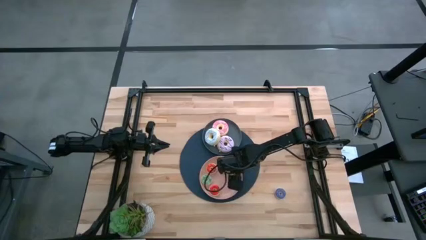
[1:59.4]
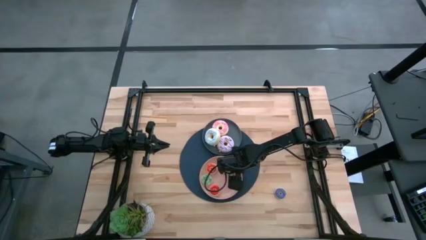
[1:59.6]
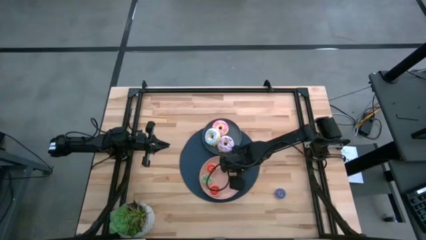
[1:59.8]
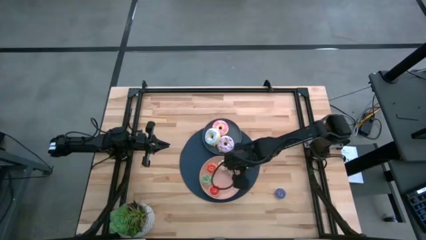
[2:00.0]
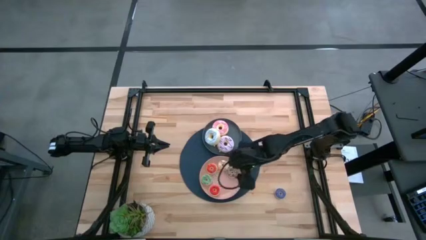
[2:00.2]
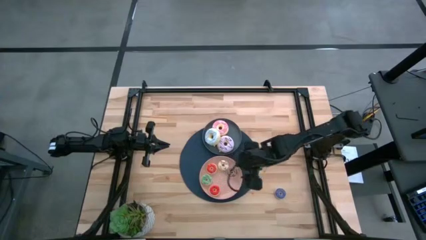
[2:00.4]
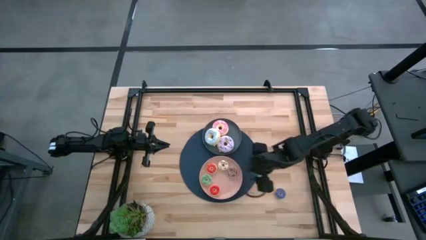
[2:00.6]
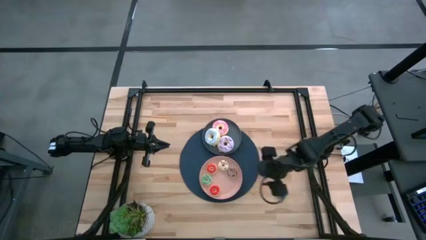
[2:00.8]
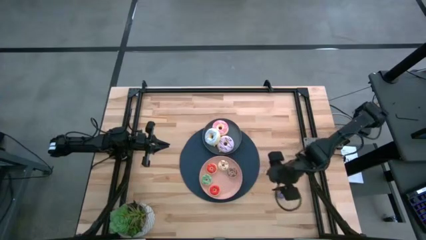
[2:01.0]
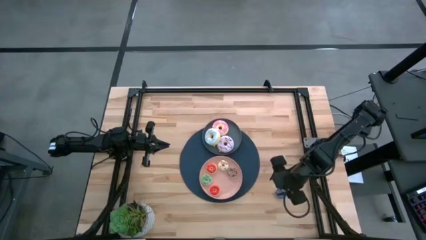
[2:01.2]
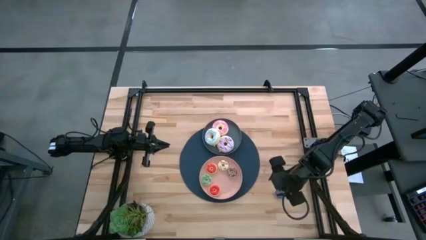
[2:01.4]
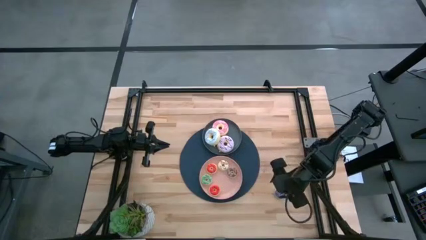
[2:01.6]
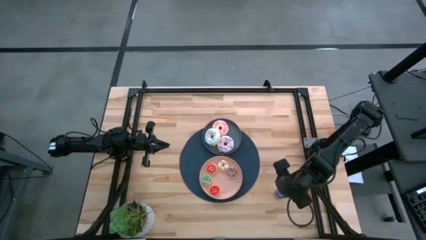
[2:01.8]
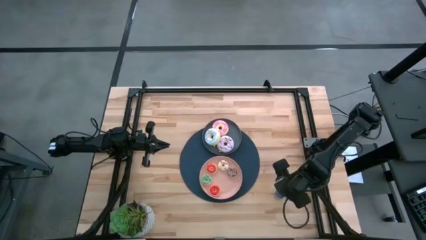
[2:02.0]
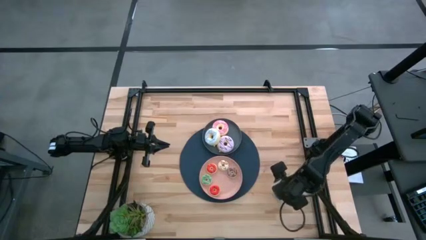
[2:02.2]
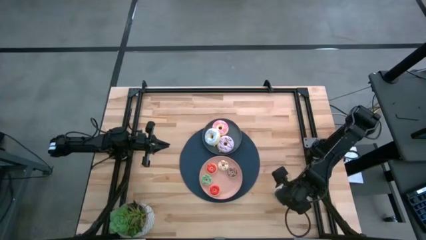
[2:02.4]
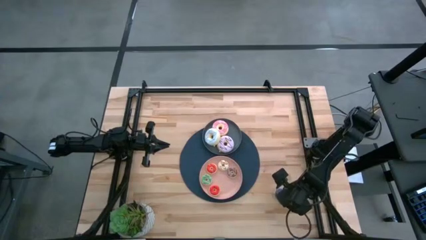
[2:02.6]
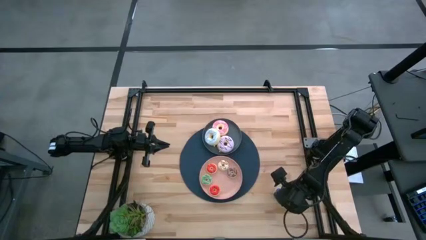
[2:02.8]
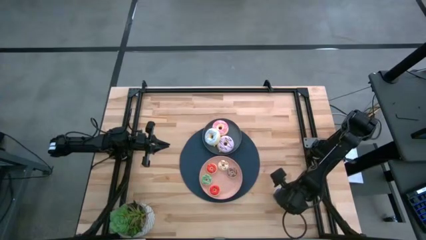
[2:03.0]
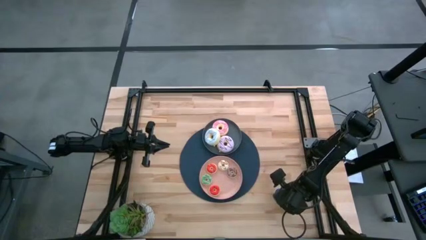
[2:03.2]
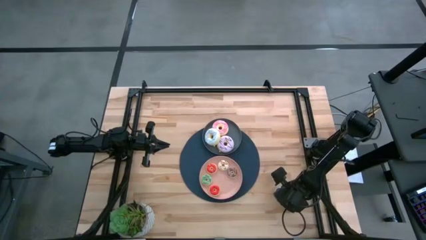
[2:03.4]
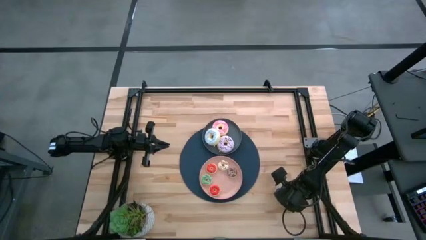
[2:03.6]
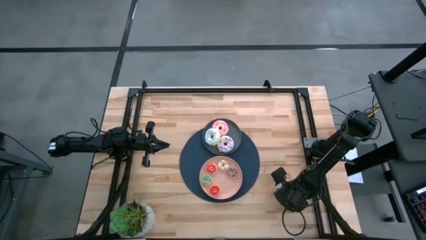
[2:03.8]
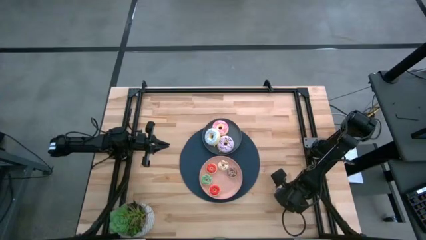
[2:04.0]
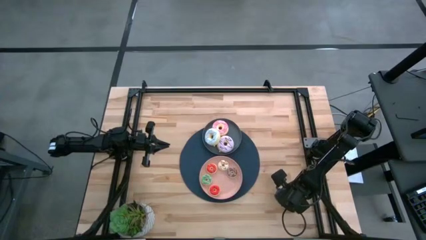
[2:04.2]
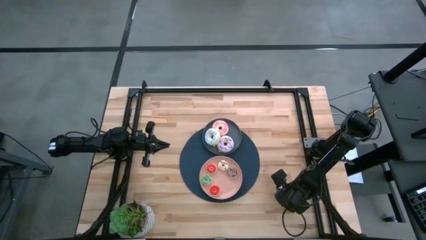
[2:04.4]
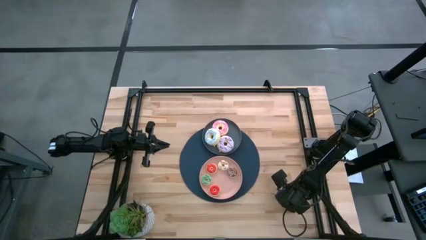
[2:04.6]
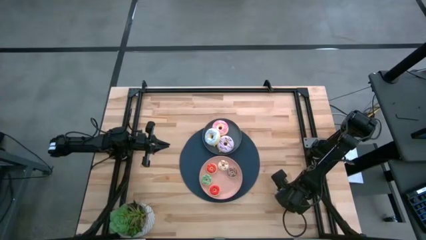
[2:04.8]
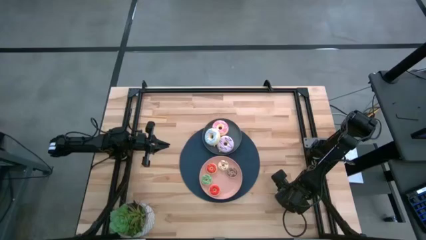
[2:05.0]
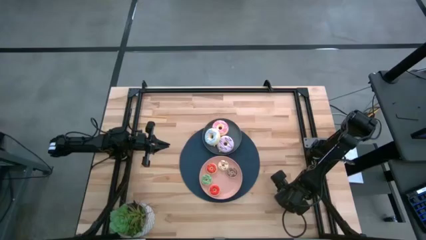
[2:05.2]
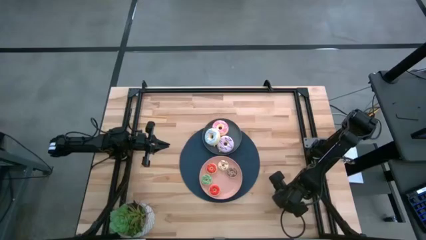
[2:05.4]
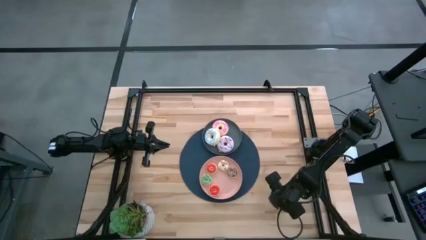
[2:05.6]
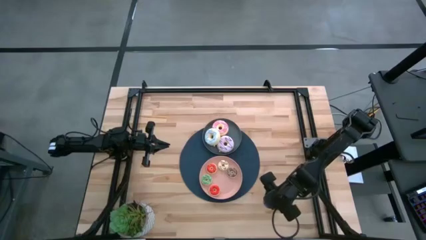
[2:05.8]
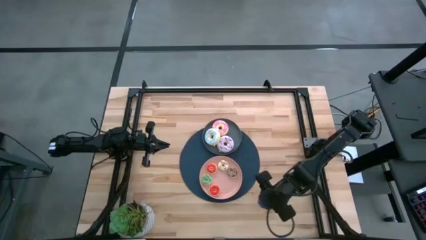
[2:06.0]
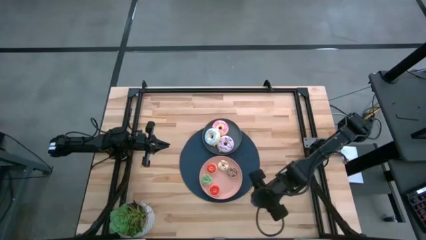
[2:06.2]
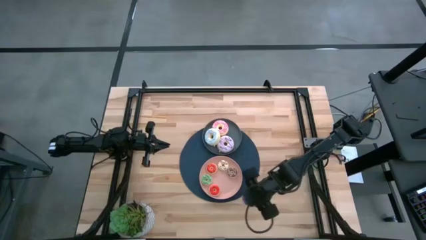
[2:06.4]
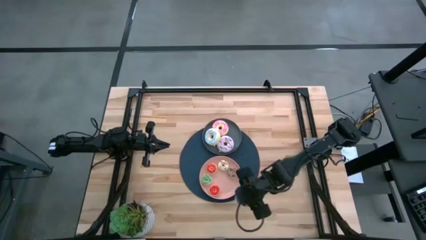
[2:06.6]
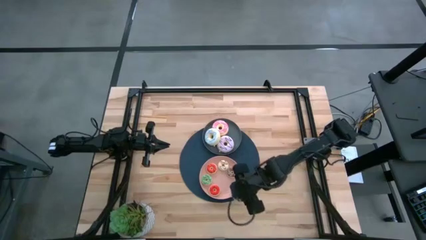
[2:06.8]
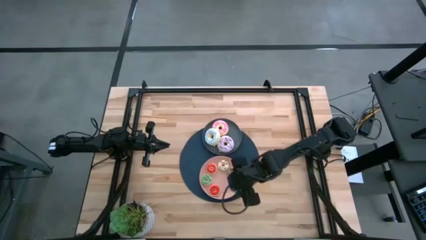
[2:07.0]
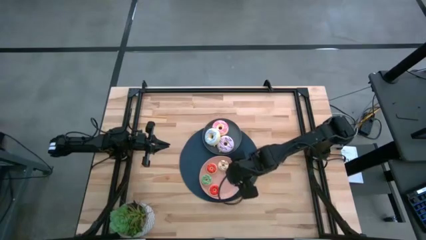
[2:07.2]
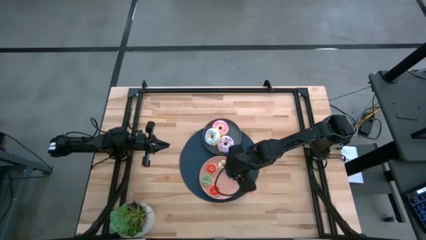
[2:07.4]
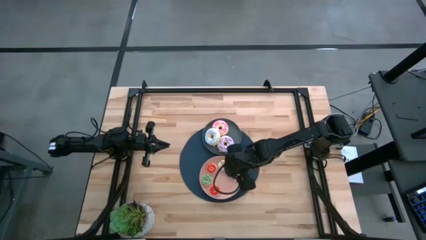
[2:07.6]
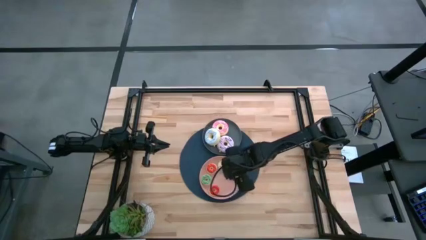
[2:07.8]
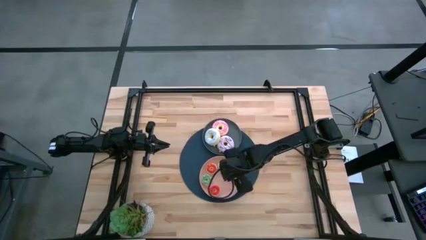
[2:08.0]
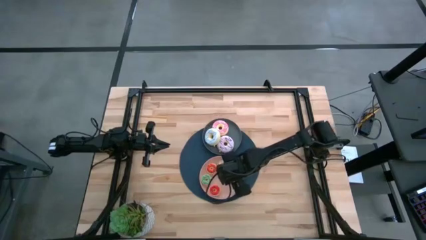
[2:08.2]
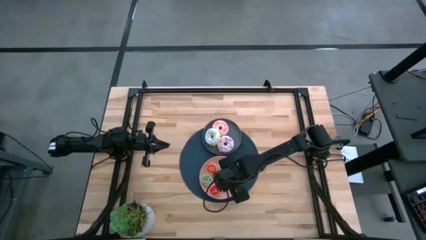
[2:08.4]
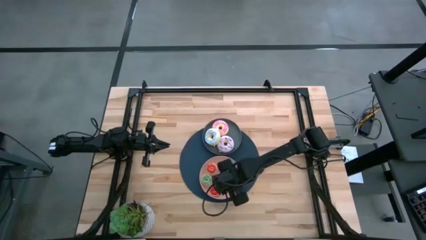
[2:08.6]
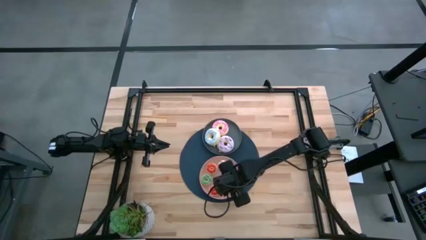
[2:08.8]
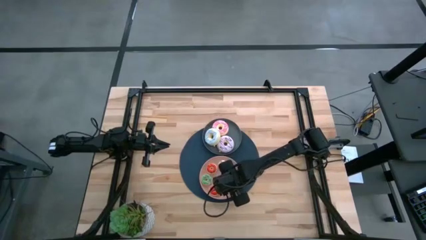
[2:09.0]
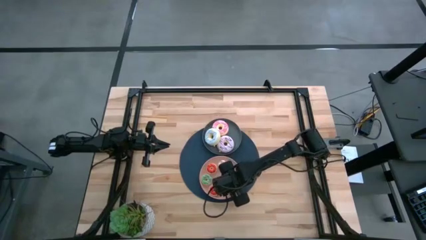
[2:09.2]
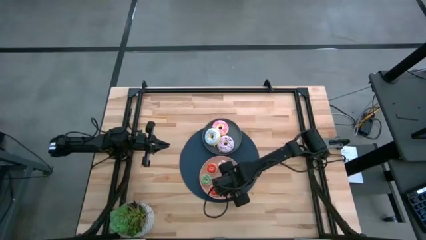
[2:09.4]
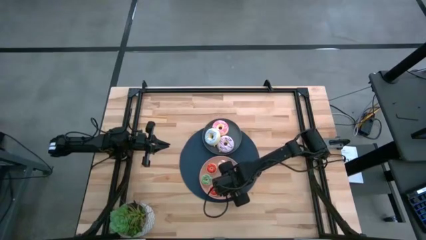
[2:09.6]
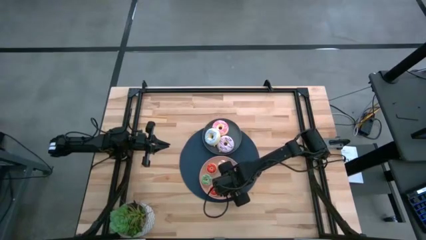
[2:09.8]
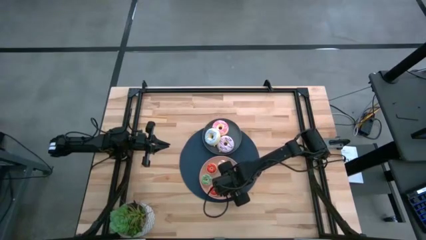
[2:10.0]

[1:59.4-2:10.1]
Task: Pick & Place donuts
Put the small purple doughnut into the pink plate

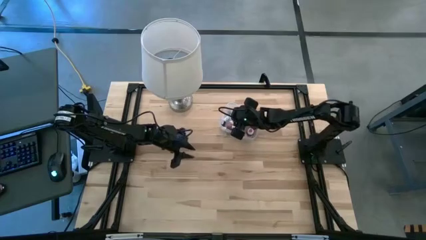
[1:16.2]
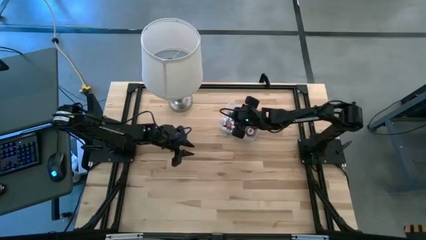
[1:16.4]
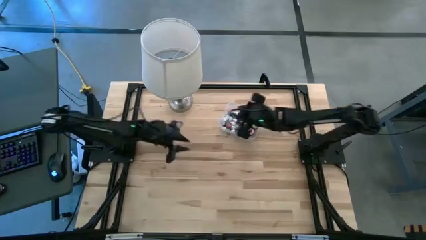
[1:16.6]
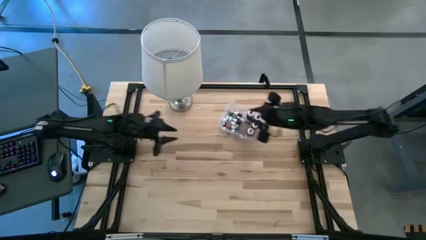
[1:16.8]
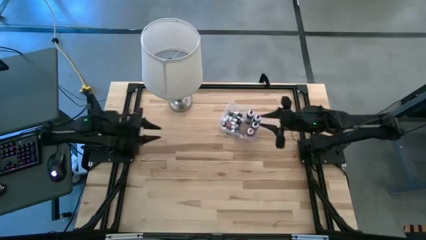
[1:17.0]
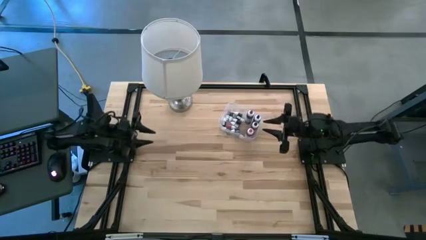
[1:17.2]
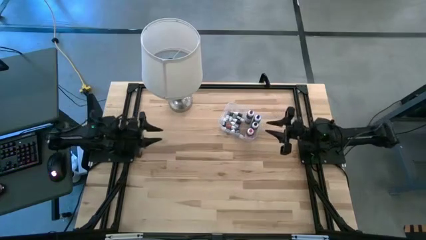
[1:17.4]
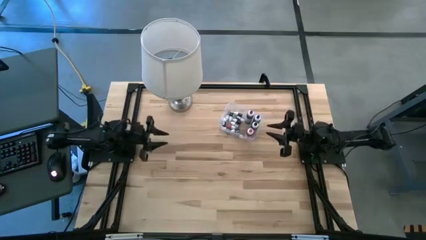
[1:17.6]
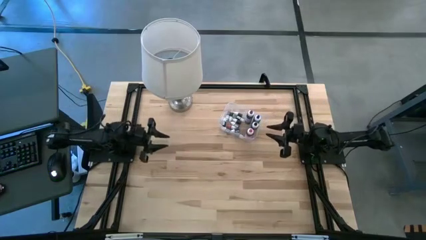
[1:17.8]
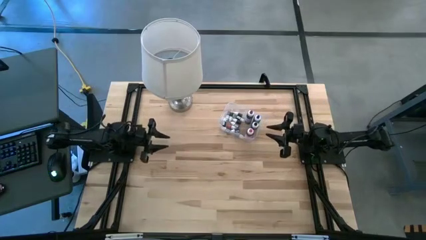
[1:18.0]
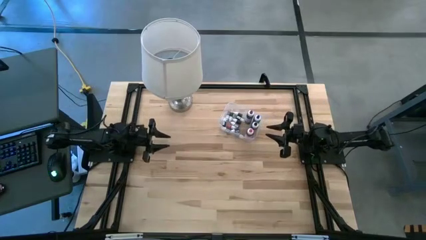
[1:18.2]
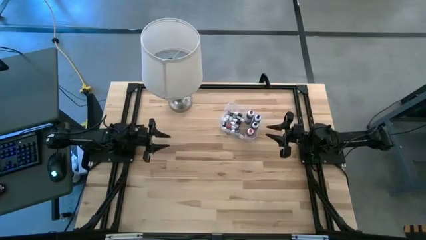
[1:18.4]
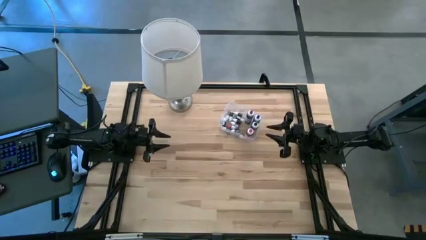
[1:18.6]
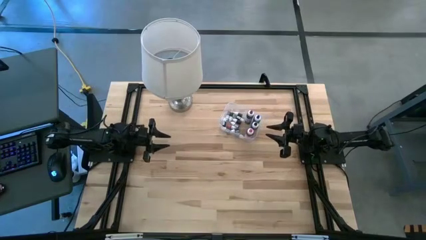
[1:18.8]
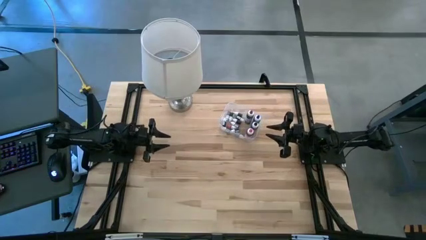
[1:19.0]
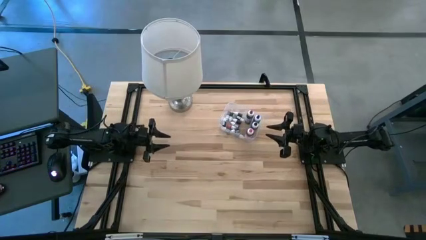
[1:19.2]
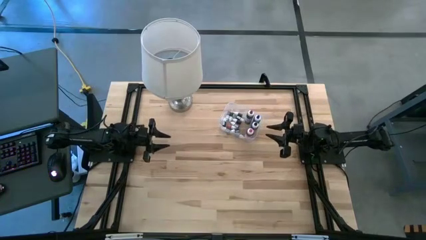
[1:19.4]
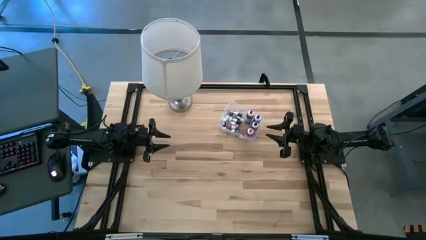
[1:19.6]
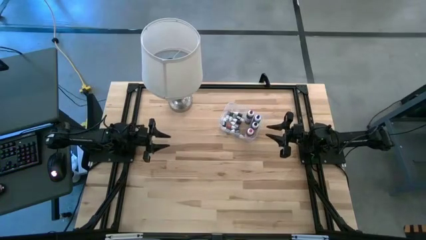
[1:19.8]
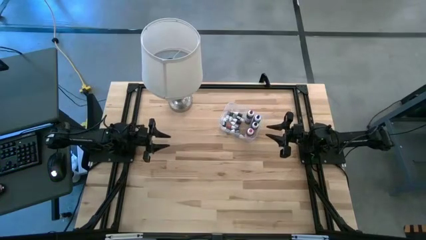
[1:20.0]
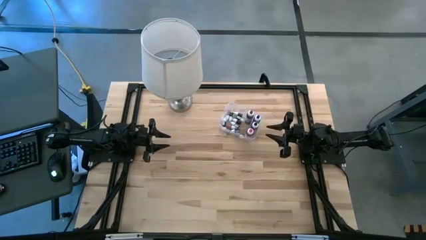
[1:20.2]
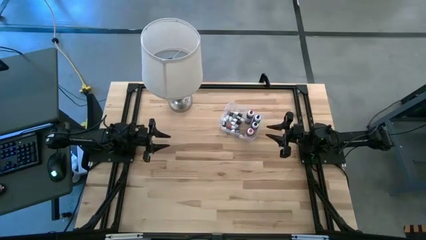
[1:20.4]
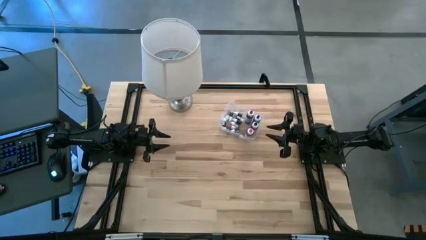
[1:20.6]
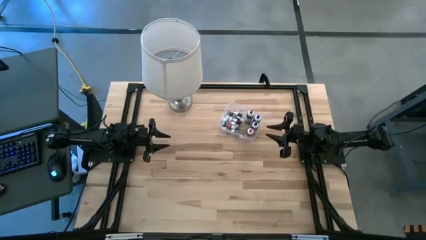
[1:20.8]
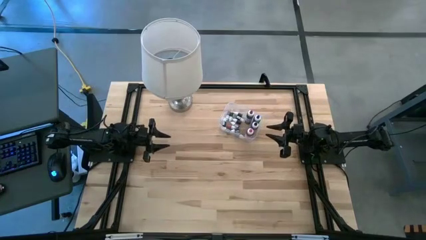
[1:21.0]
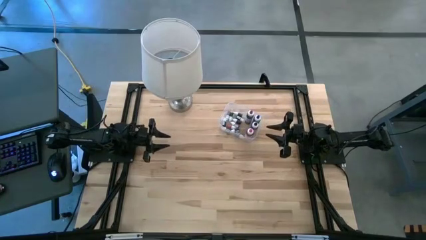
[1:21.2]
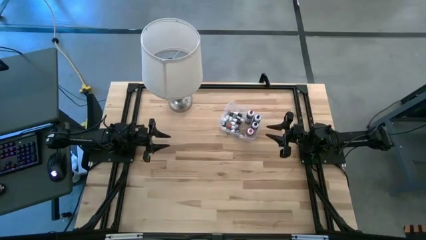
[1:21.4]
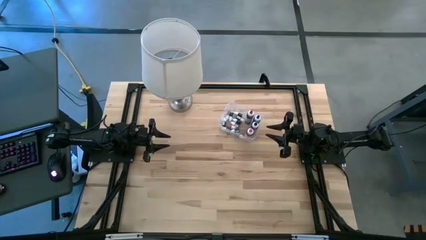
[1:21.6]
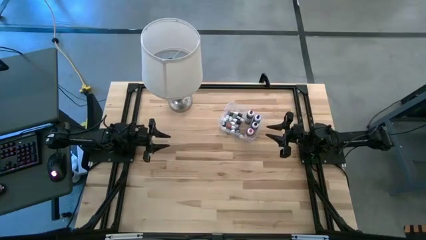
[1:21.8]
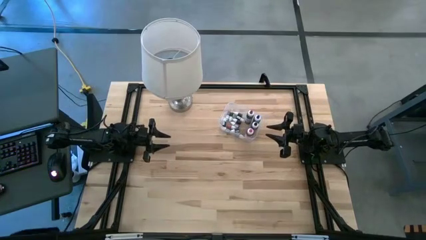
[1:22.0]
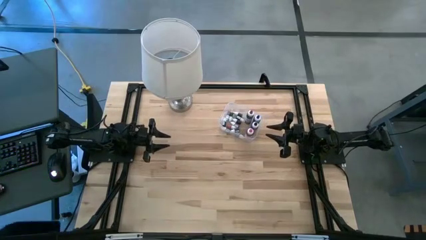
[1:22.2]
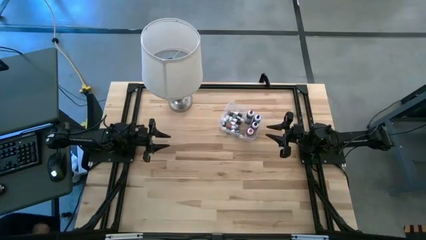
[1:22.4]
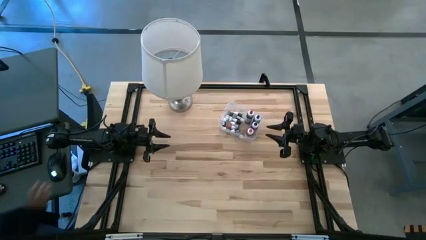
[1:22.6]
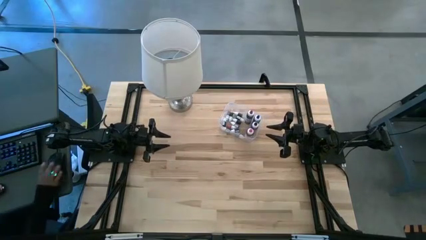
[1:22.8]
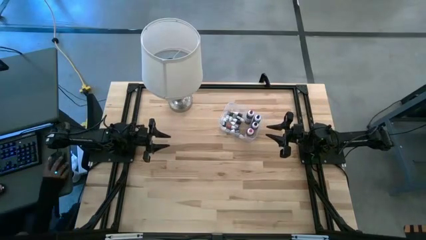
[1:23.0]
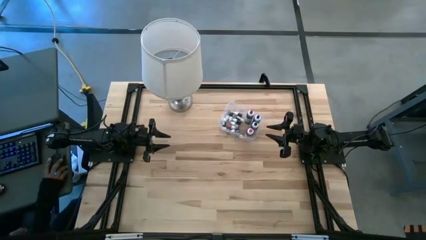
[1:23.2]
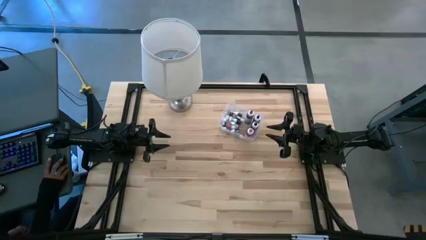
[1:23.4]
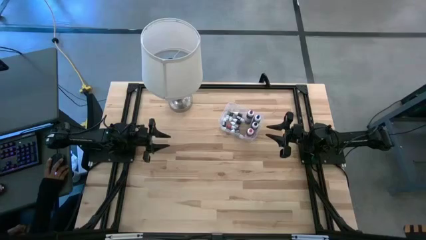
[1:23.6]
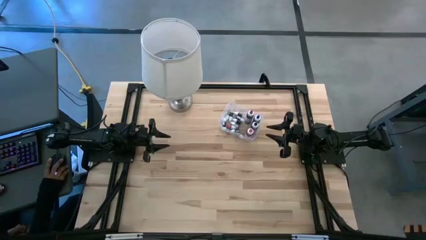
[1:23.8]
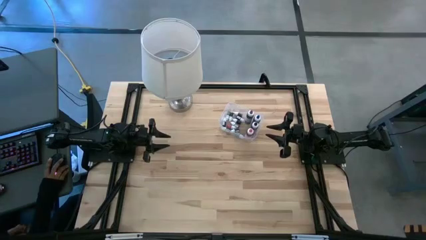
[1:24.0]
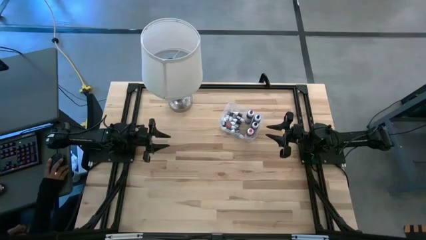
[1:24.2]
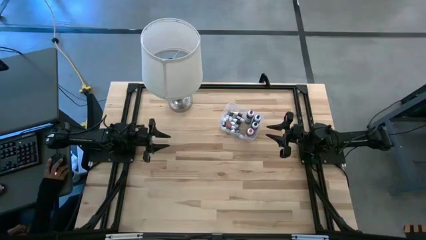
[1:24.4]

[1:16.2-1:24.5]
Task: Pick & Place food coloring
Return to Home Position
